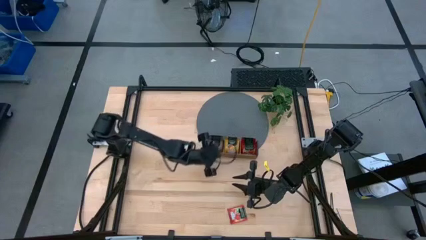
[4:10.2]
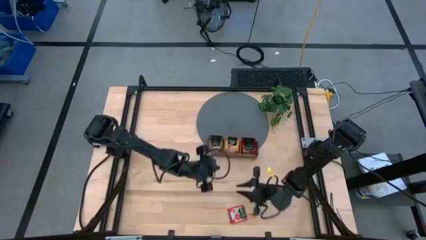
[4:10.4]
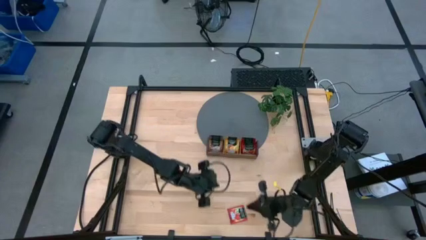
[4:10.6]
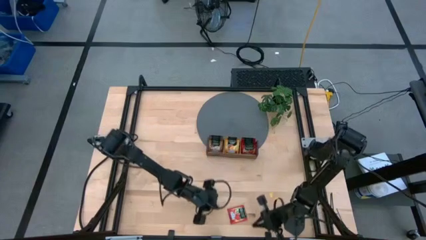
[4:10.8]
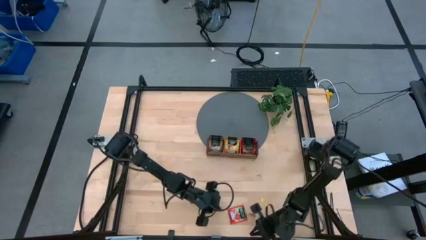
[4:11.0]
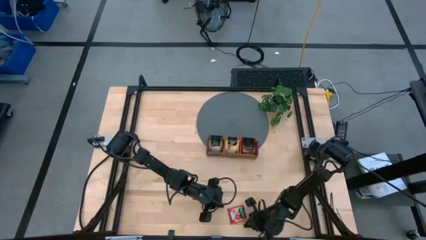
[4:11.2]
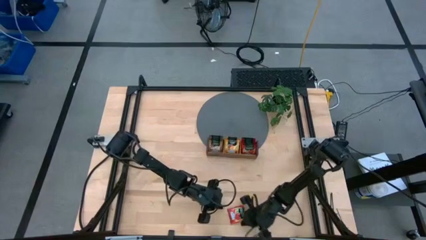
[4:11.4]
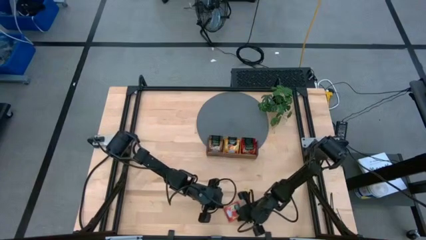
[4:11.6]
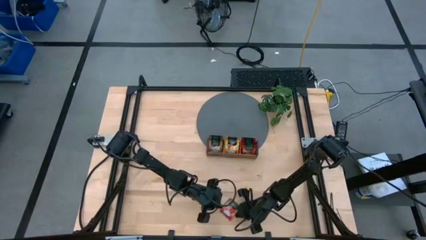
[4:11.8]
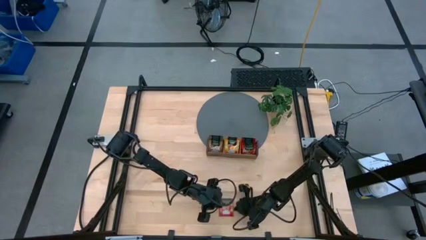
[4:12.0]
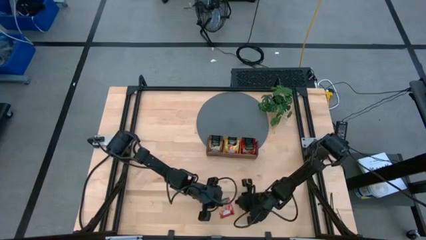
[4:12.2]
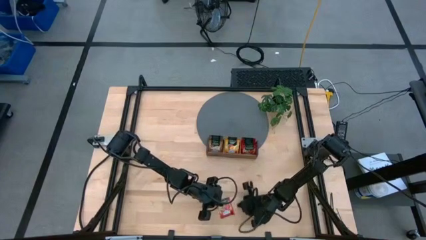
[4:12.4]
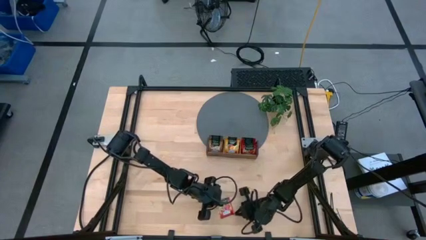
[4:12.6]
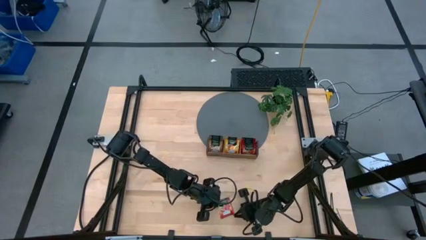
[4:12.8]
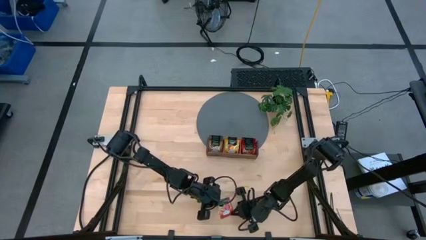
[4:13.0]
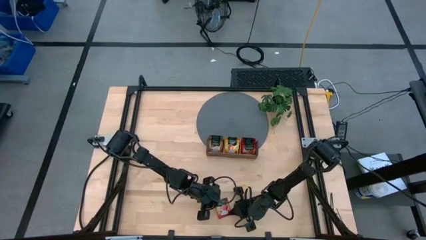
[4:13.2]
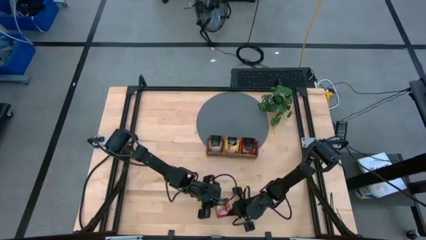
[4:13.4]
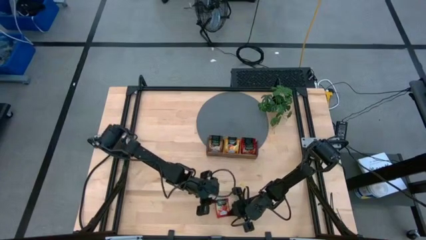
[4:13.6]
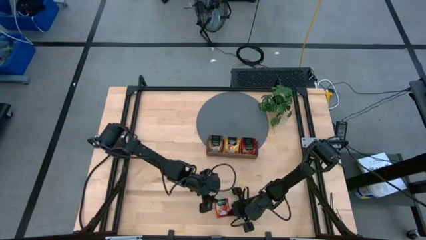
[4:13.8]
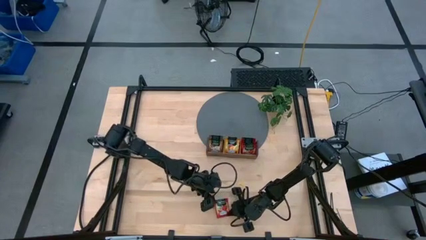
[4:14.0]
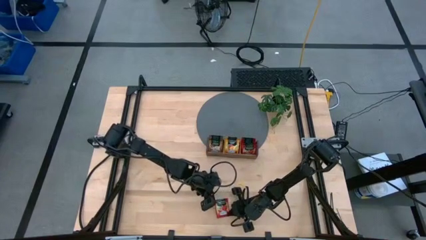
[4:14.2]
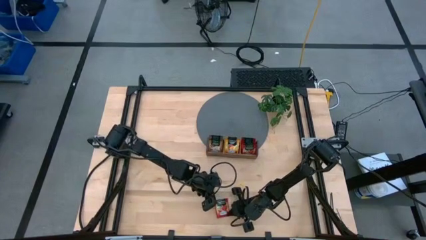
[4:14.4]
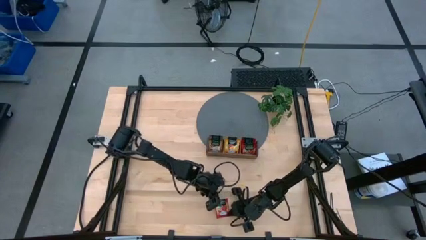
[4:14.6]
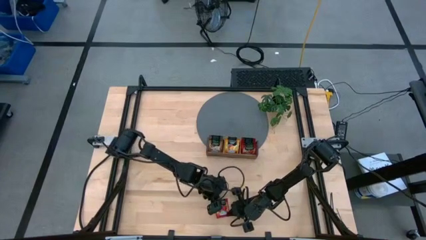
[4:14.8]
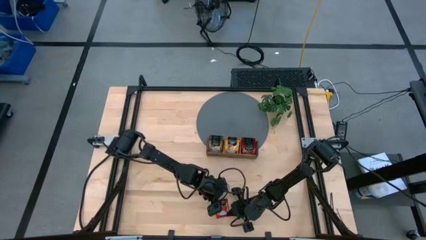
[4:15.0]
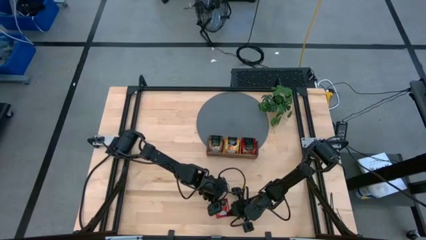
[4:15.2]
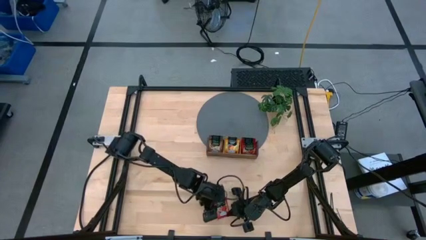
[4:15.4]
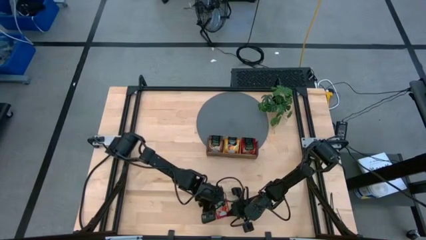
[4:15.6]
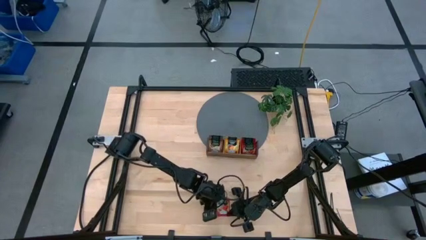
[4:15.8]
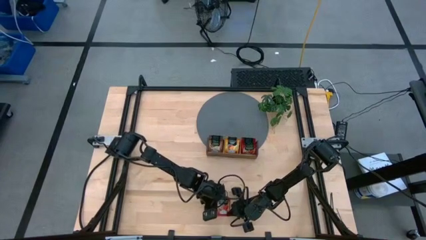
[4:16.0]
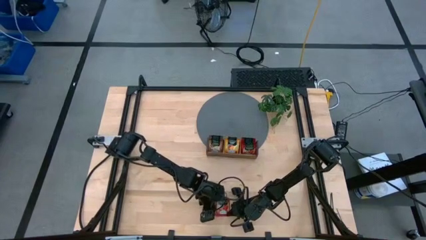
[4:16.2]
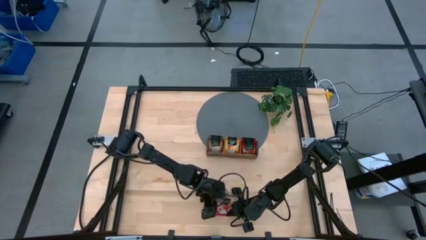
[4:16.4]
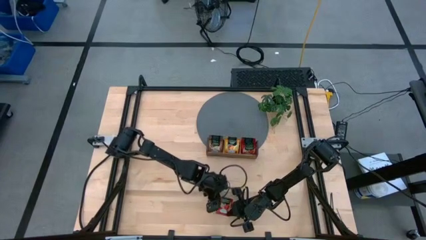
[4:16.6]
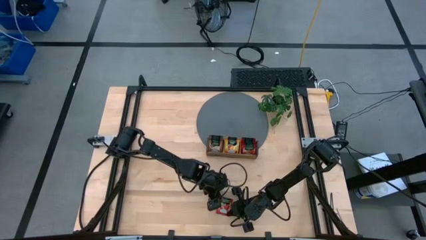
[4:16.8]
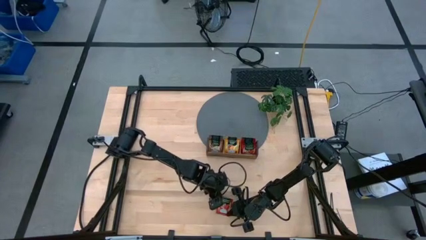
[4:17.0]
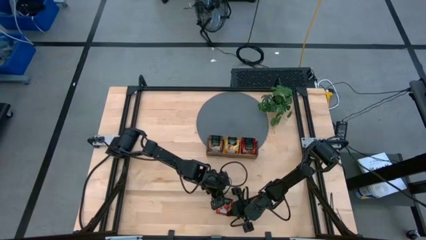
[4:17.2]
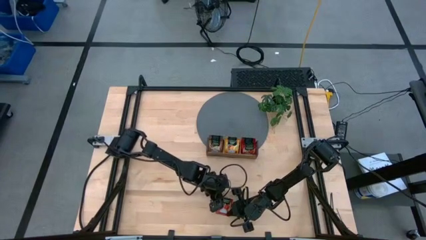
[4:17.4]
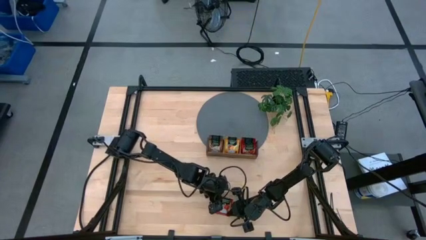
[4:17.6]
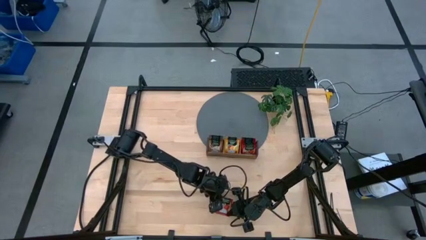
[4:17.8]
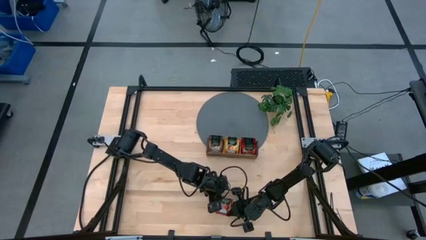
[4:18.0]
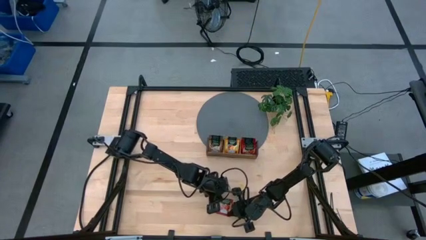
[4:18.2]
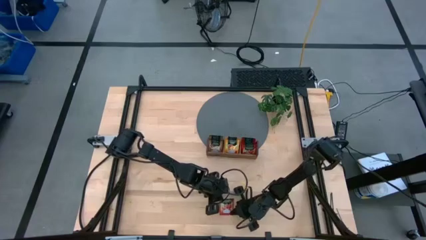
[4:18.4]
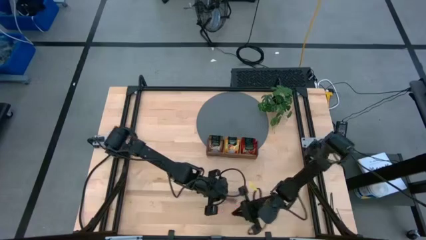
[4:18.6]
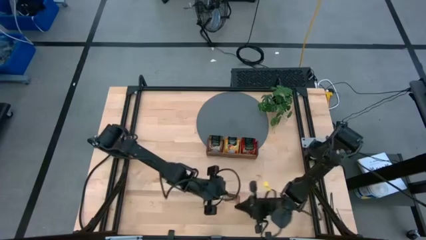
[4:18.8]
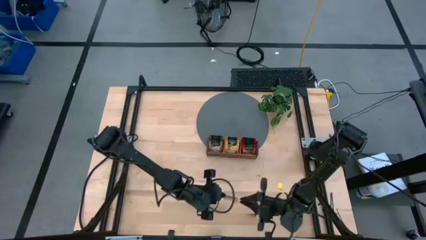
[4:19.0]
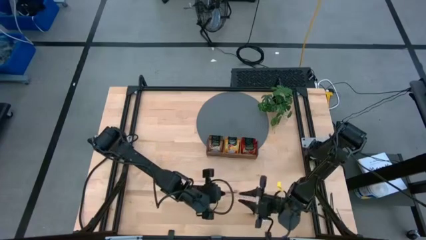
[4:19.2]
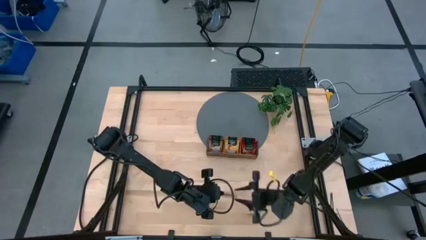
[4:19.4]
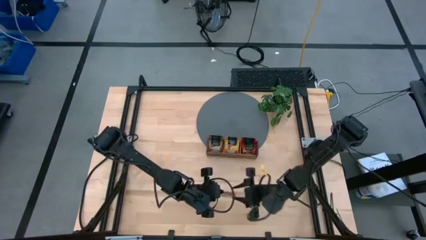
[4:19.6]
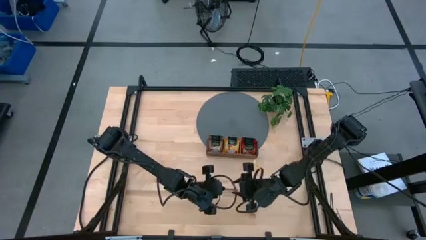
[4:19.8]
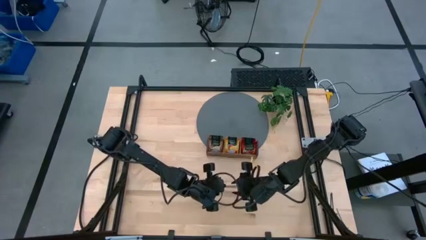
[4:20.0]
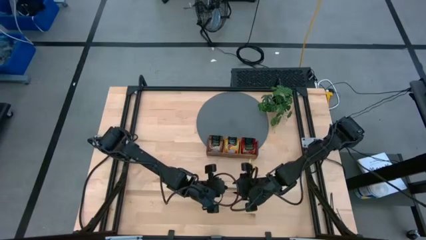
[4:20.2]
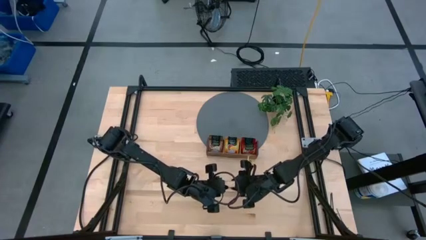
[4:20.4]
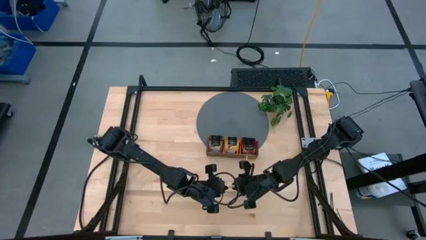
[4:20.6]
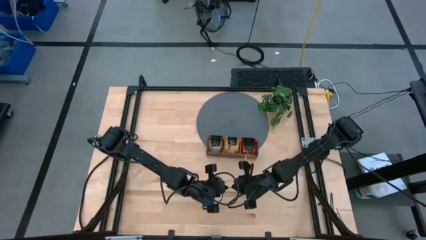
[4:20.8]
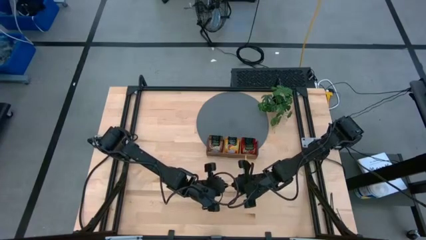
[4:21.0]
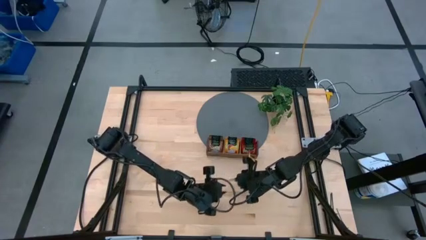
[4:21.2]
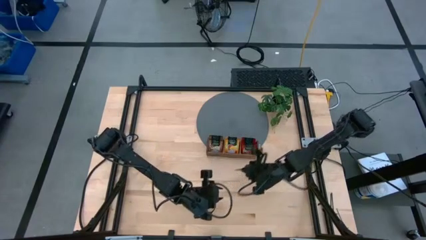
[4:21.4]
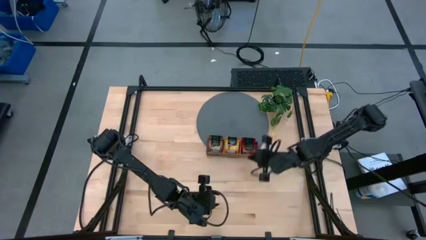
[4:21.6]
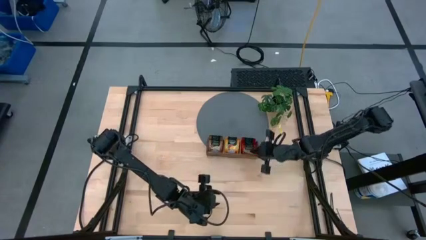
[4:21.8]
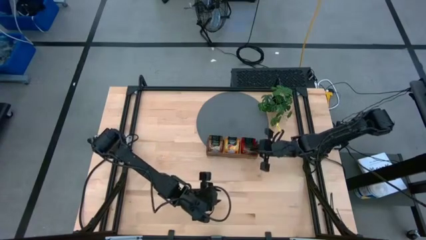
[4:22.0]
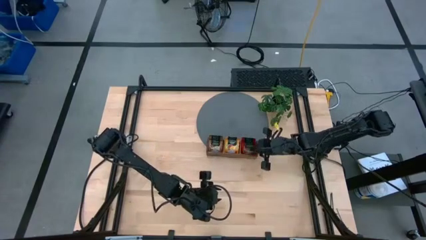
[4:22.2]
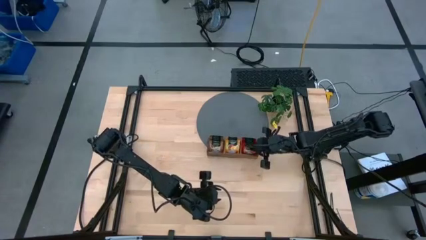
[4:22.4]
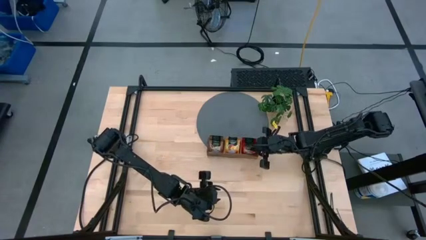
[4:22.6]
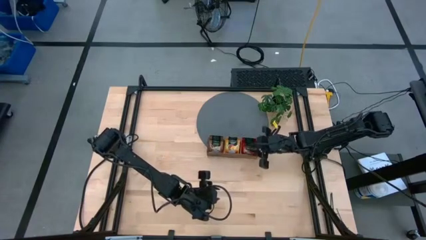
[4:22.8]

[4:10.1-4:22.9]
Task: Pick & Place Tea
Put the red tea bag into the middle wooden organizer
